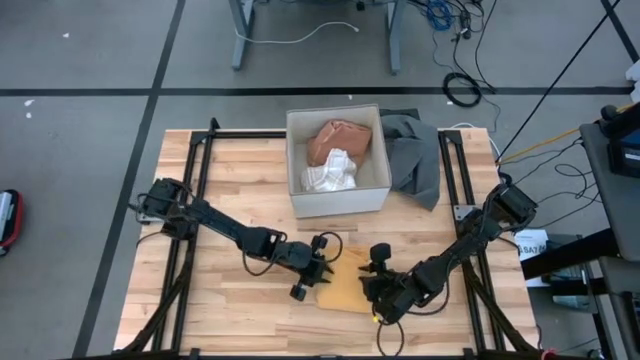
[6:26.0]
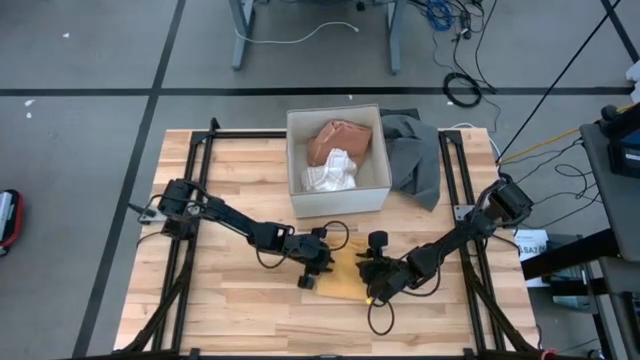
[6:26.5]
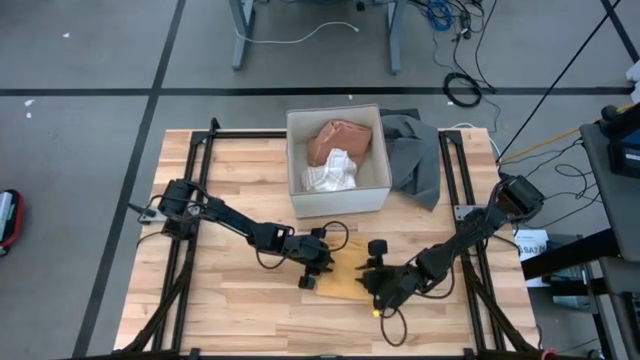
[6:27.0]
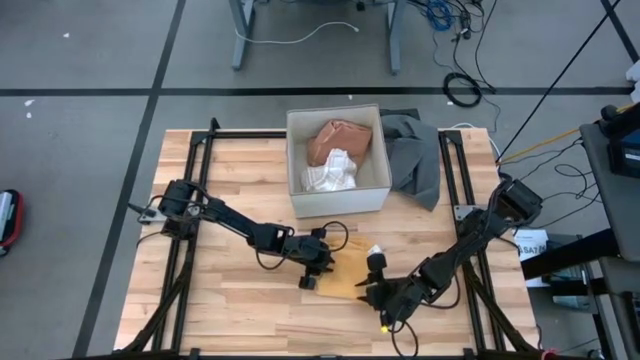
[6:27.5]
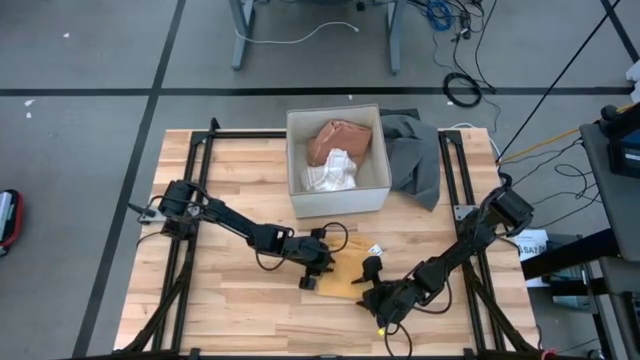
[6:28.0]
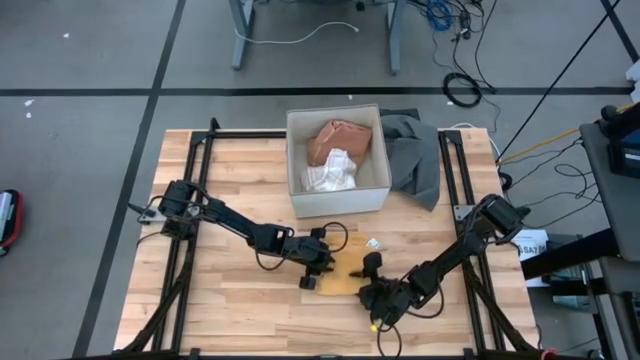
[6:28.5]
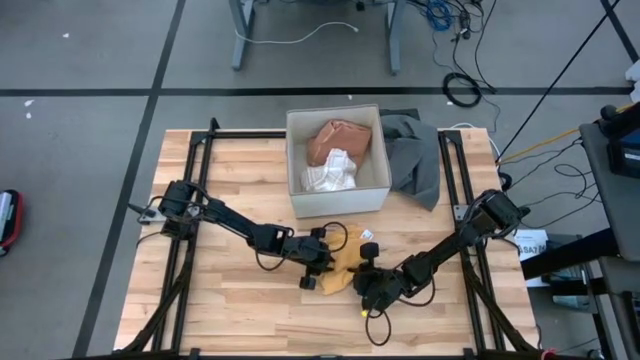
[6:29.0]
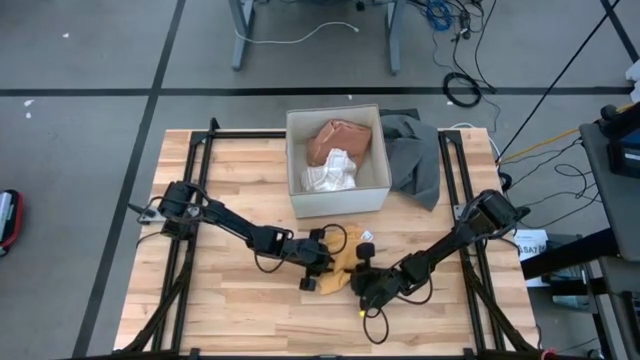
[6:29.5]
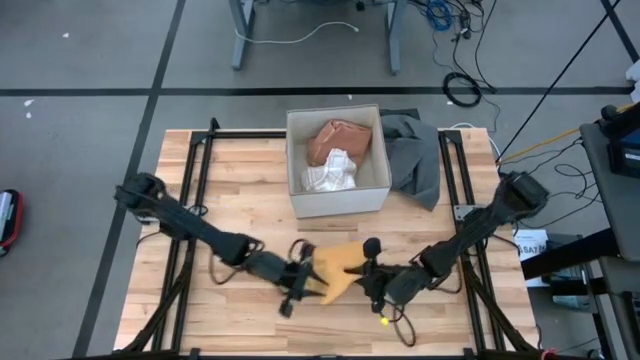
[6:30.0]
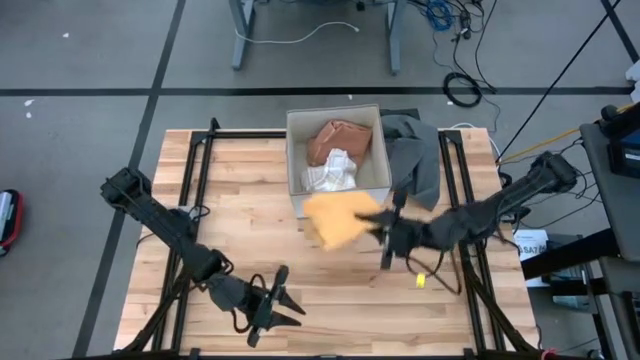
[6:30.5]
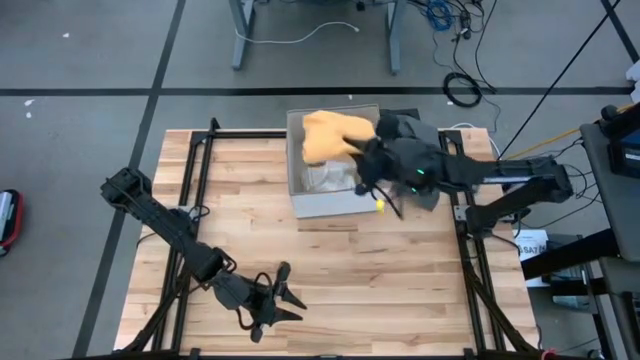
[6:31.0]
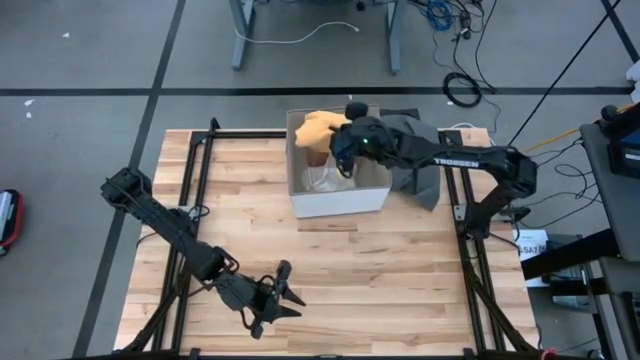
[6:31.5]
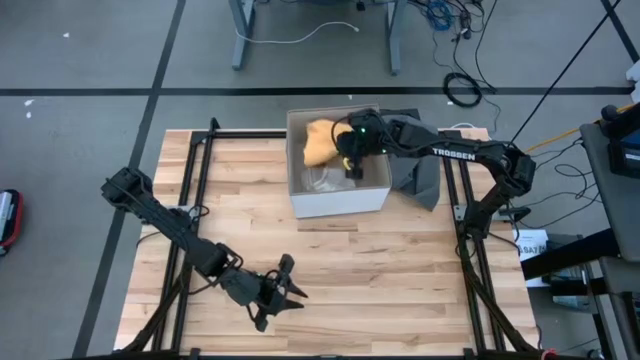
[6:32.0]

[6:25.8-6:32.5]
Task: Fold towel
Put the orange towel into the laundry bin

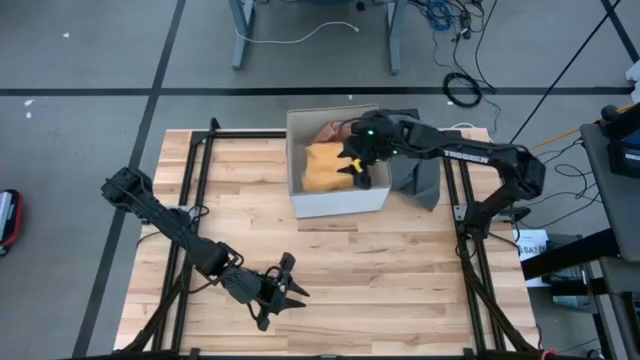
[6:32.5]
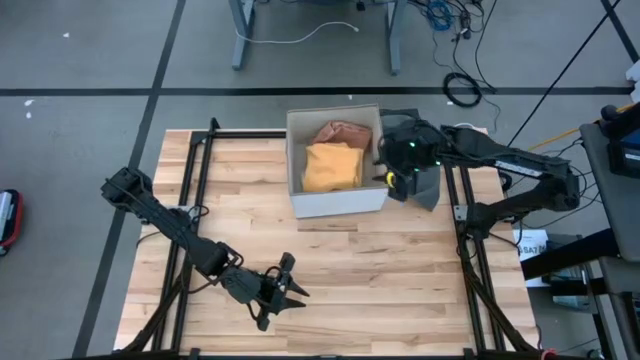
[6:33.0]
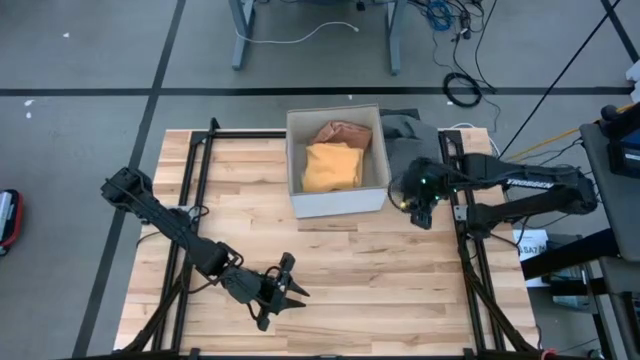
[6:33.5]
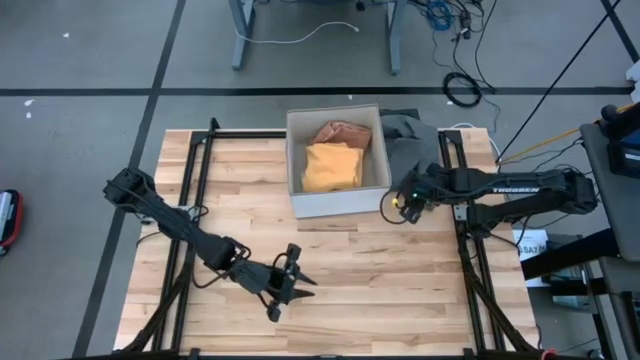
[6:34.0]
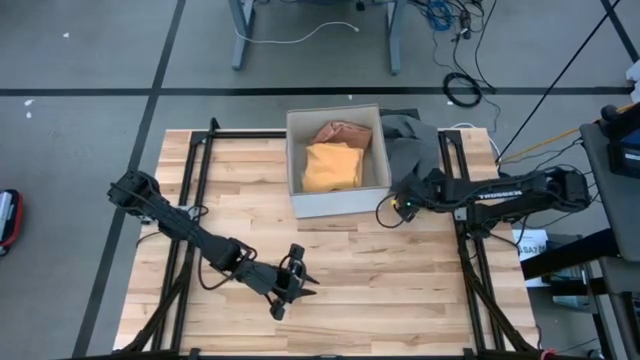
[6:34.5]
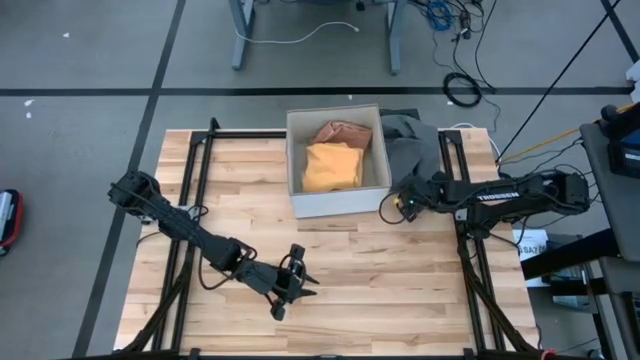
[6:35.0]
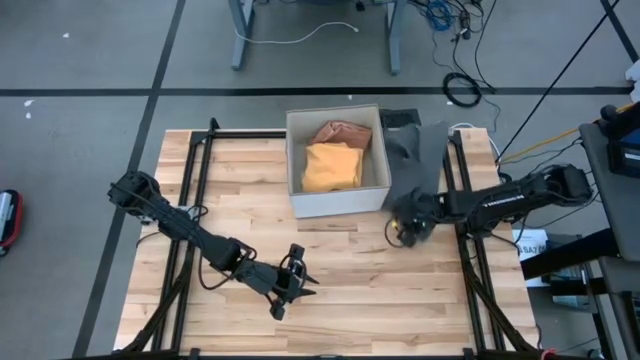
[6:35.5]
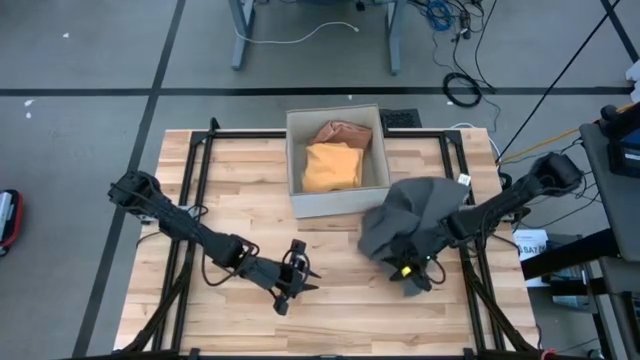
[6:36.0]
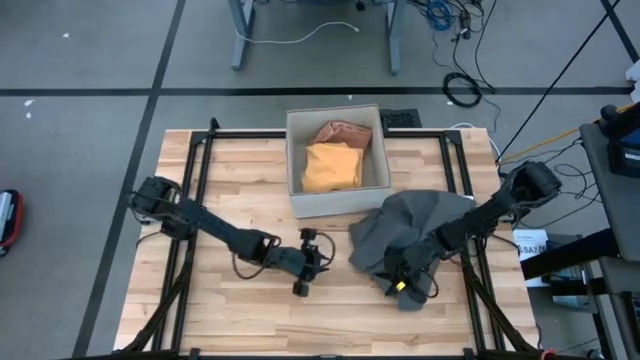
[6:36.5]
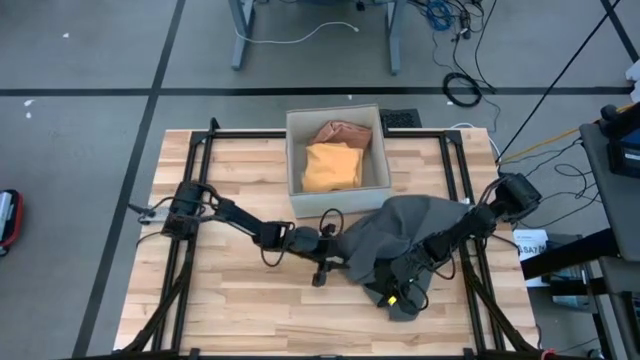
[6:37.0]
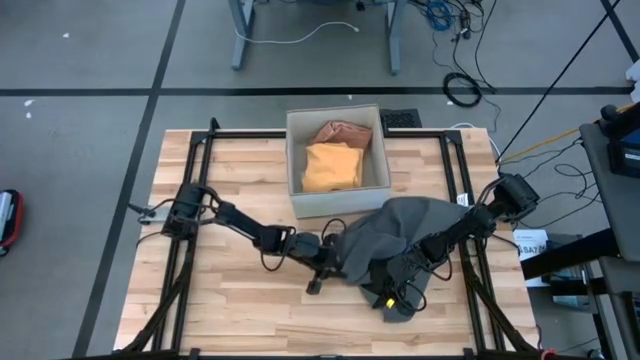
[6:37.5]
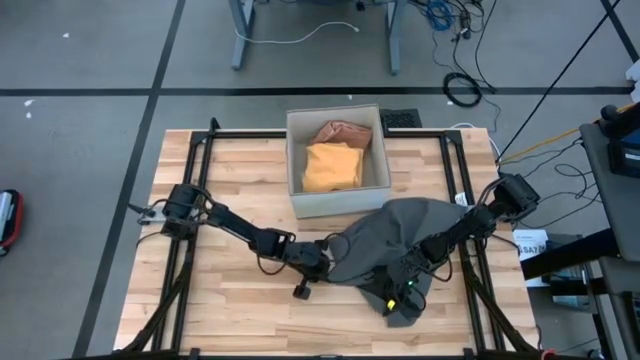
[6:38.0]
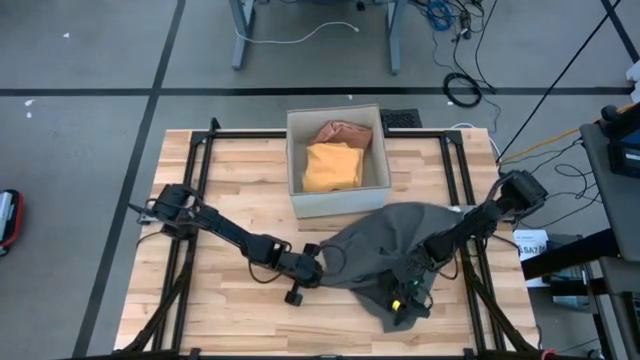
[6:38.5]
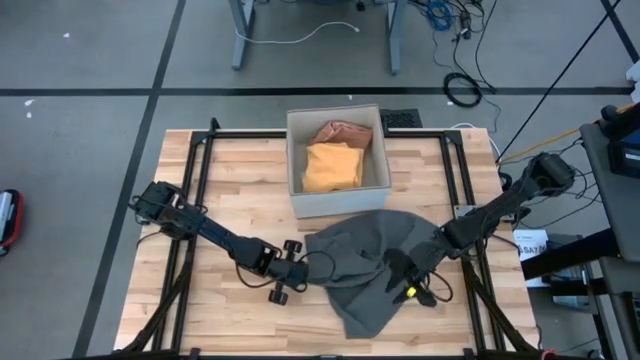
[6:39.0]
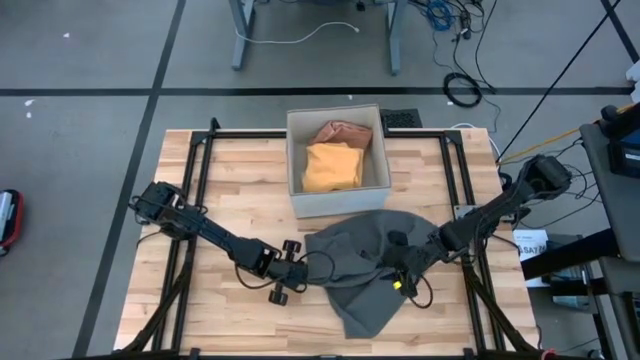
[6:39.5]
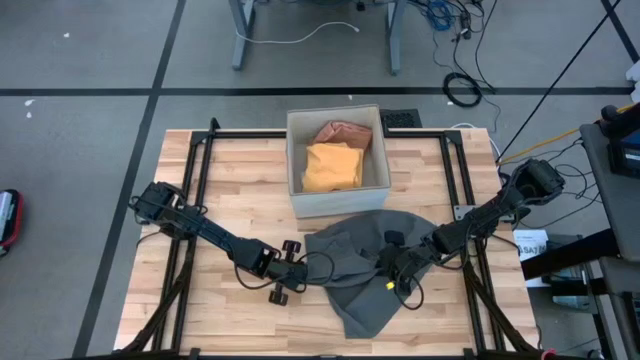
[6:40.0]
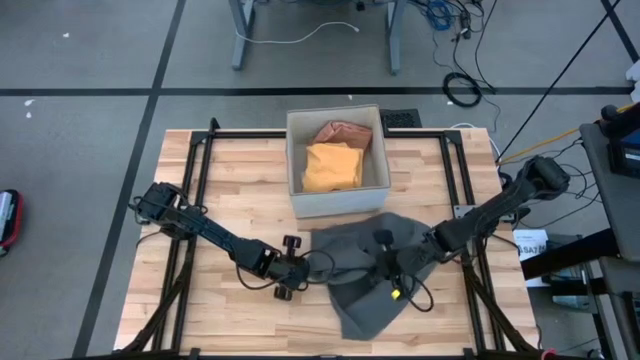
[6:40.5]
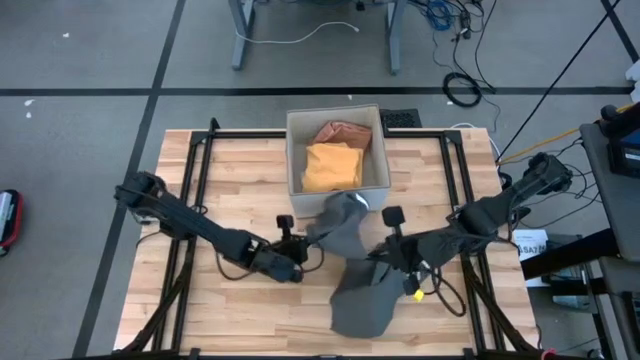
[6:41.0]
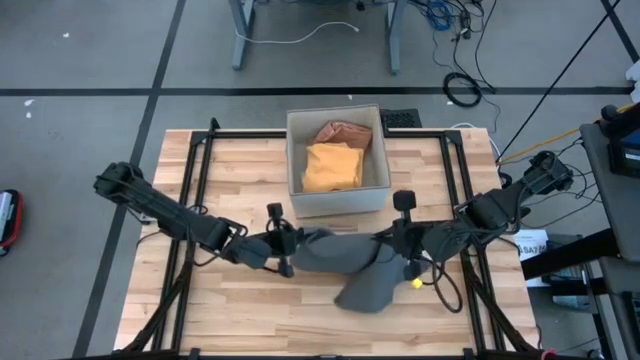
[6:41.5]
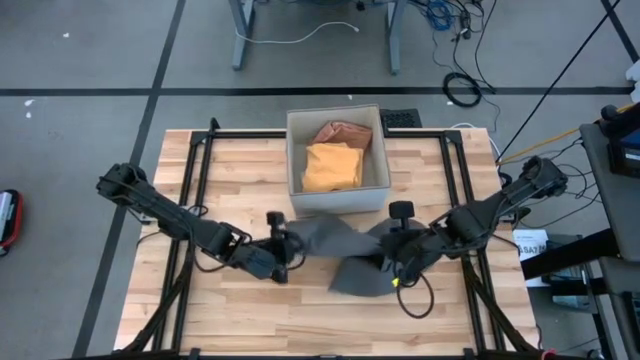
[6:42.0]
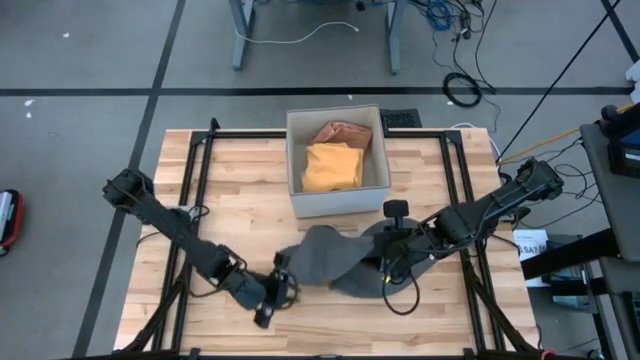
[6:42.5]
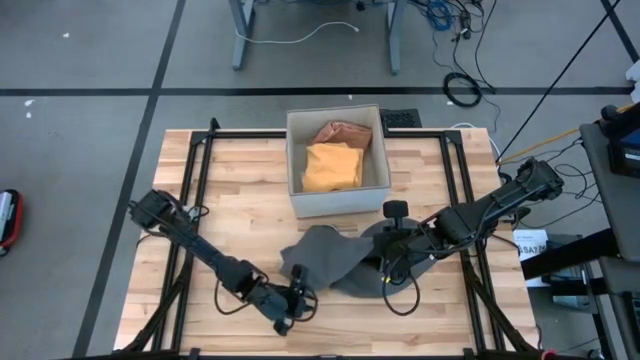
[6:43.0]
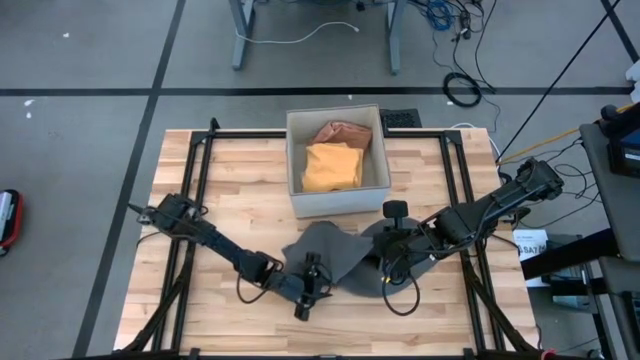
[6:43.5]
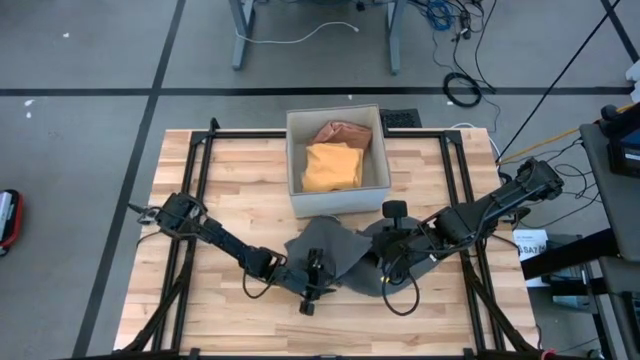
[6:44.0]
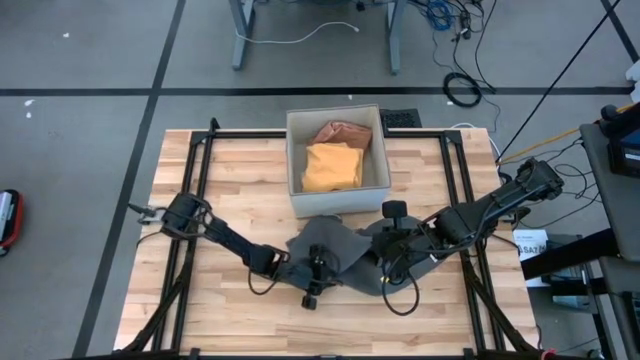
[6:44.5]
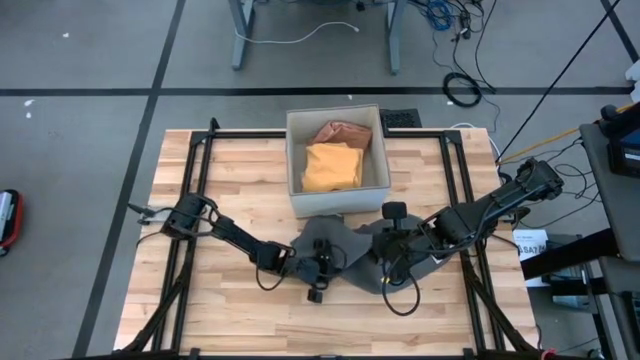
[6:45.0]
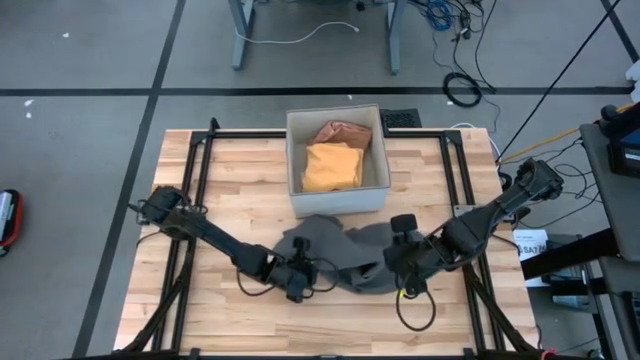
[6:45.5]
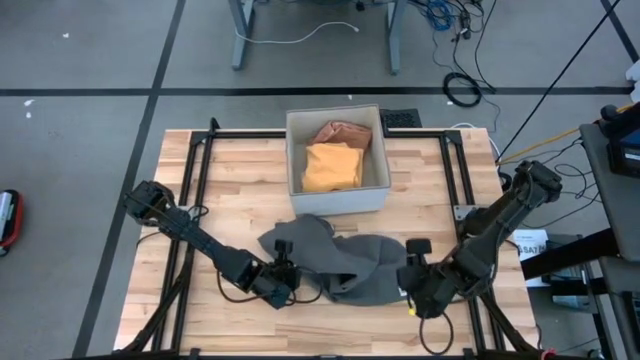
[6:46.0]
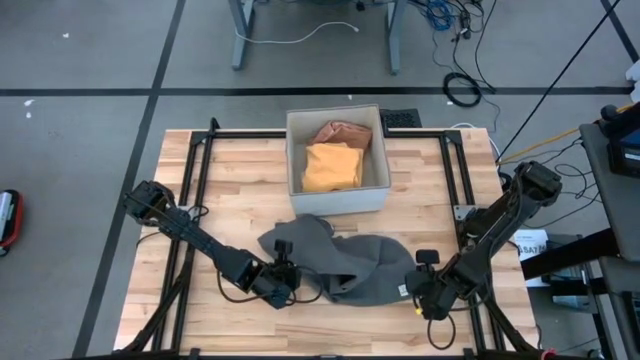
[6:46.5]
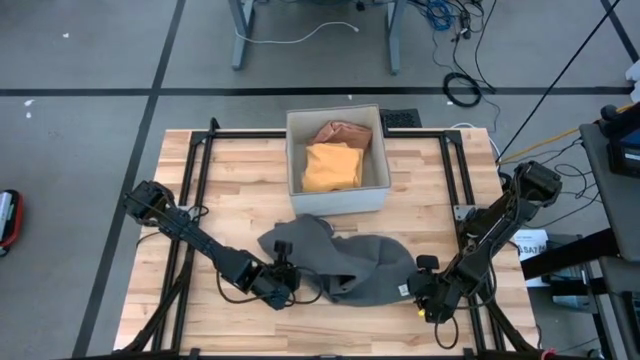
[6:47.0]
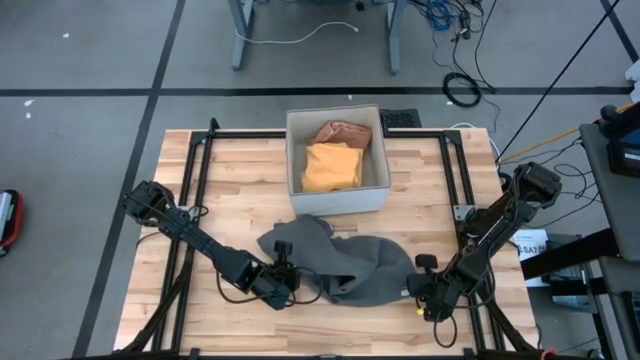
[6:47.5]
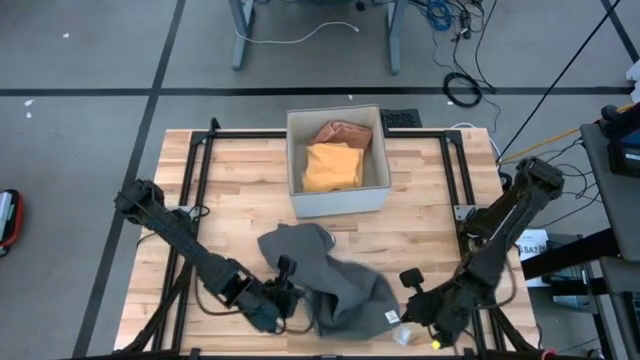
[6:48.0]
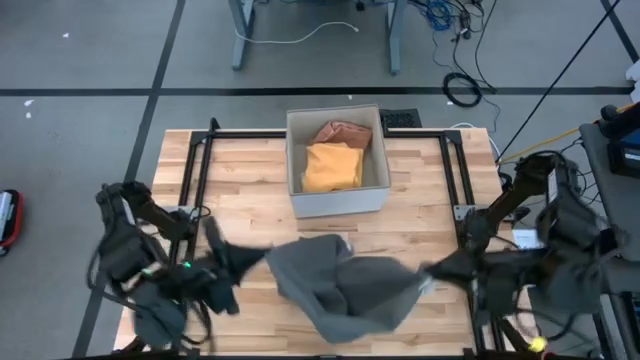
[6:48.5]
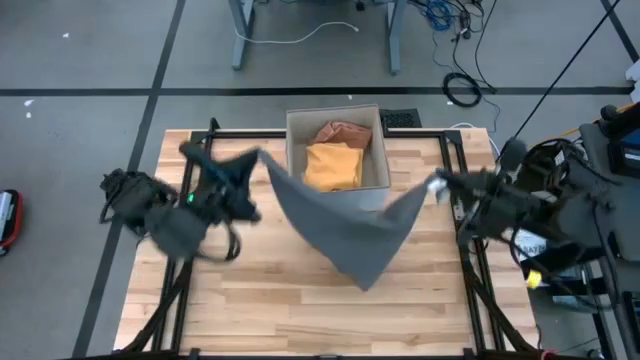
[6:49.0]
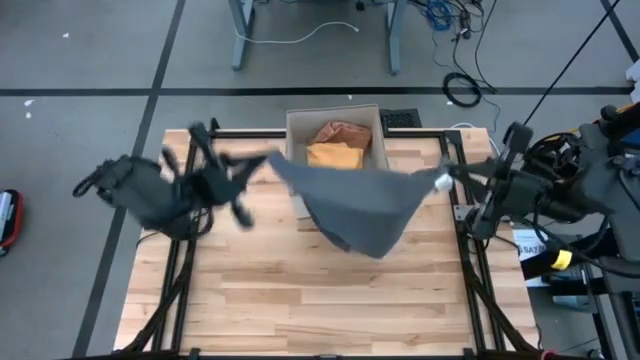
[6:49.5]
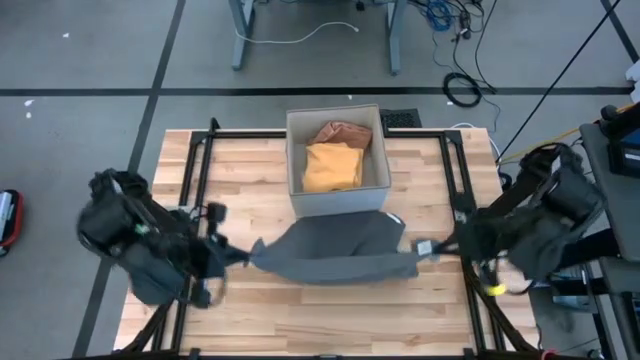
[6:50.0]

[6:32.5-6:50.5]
Fold the gray towel
